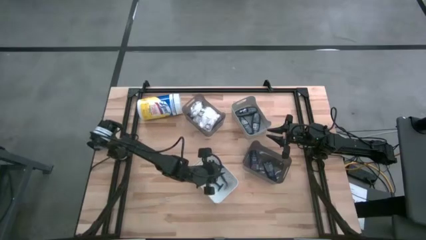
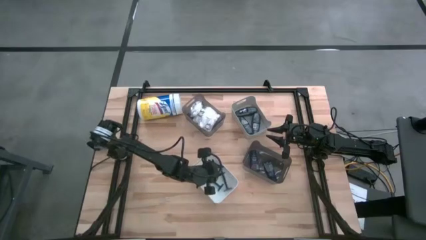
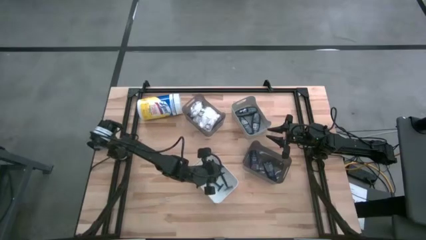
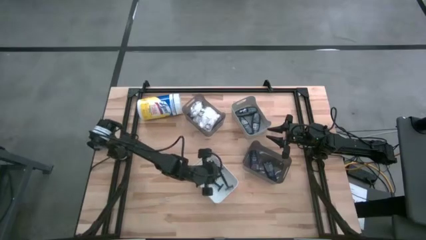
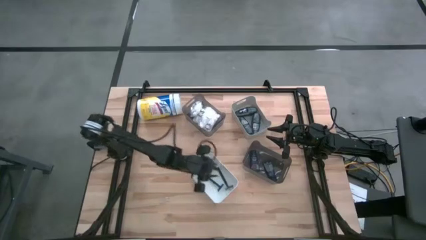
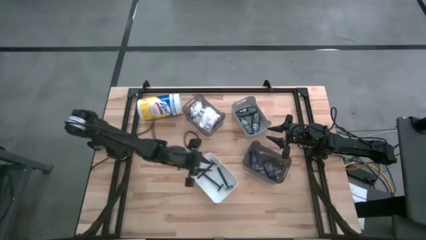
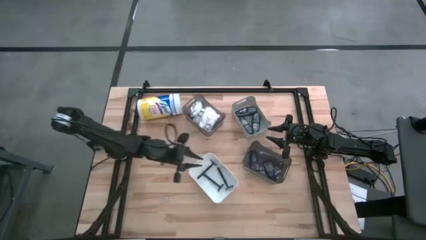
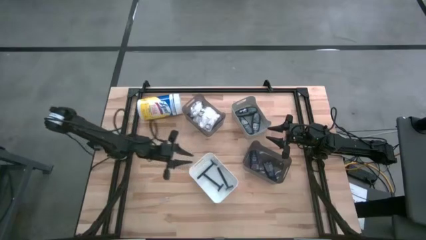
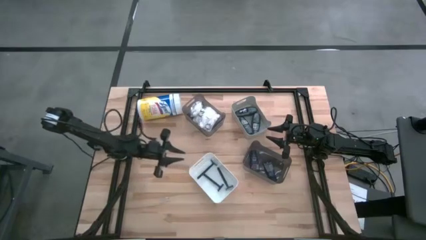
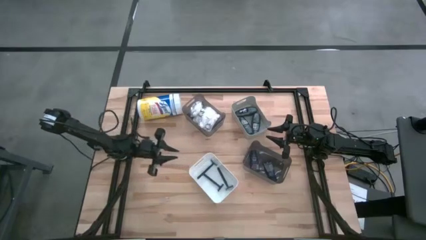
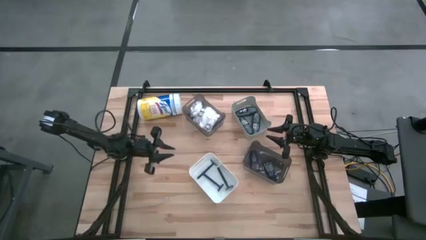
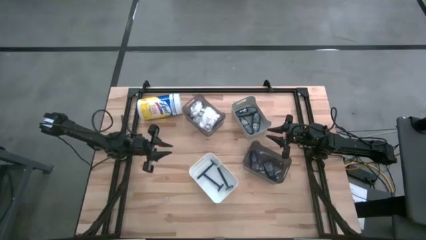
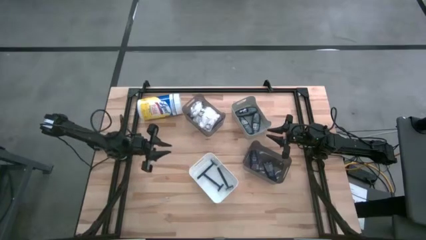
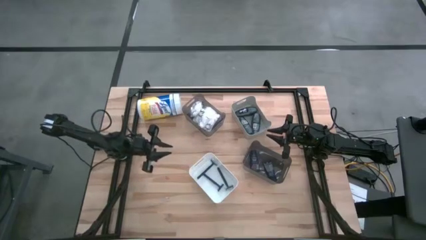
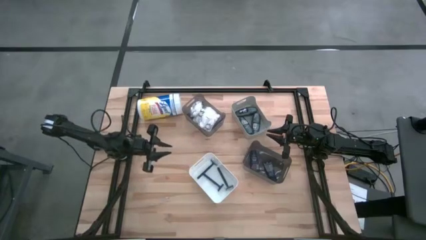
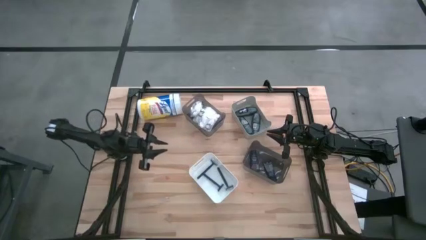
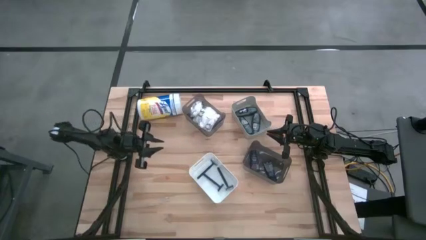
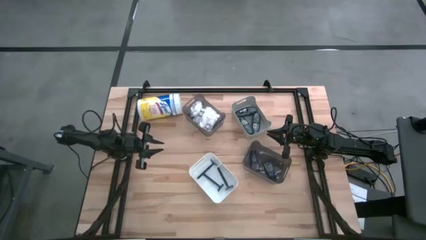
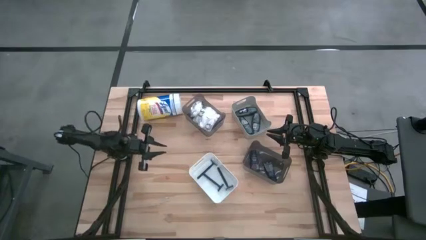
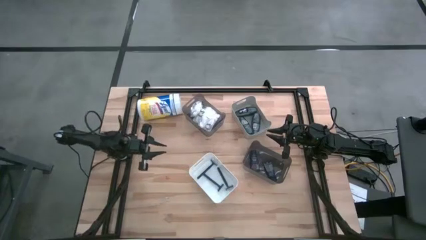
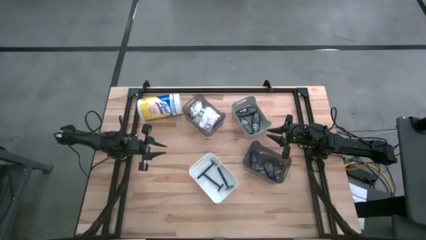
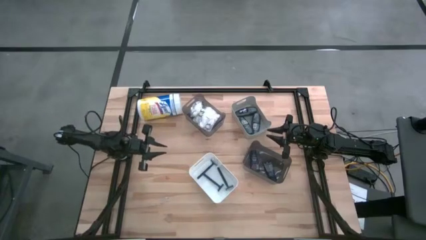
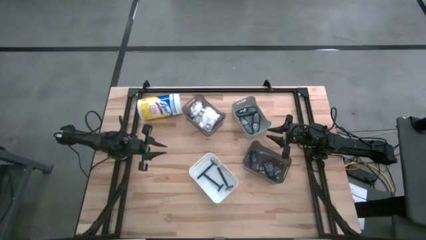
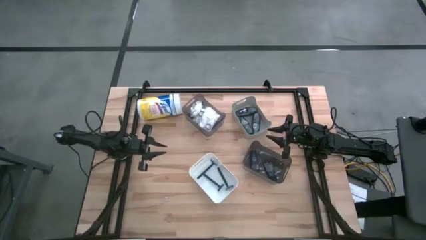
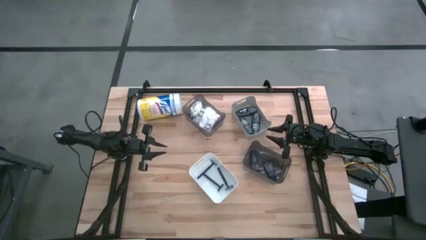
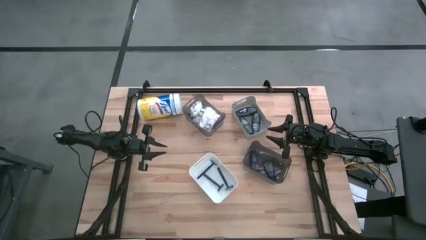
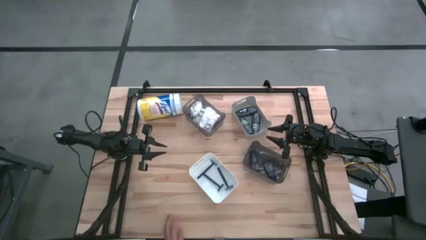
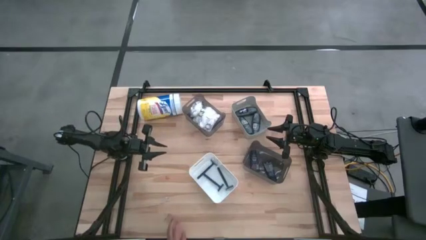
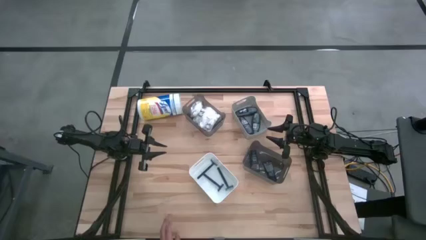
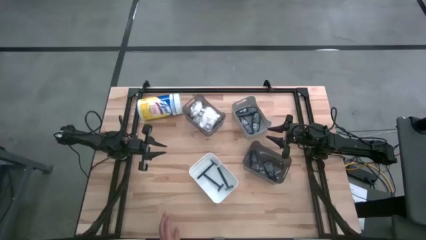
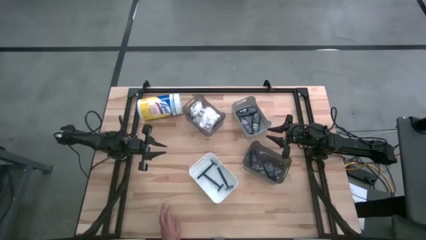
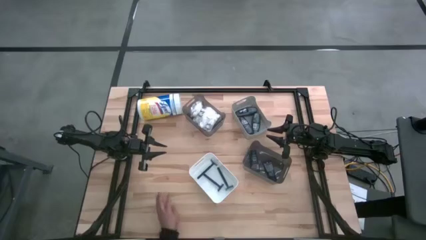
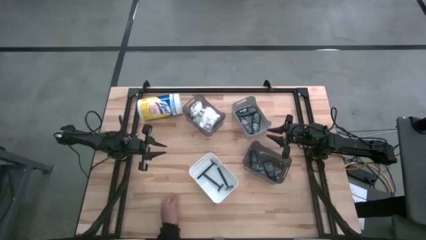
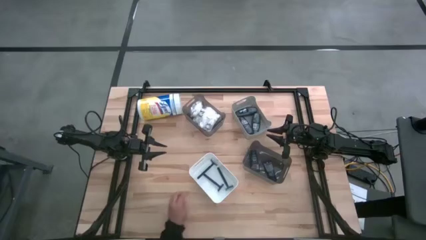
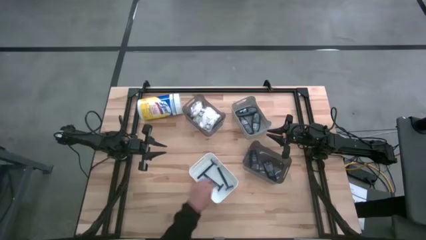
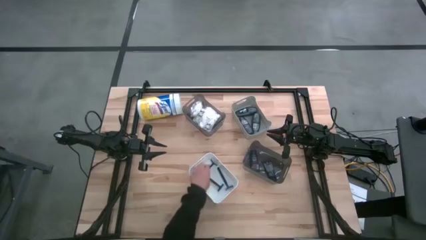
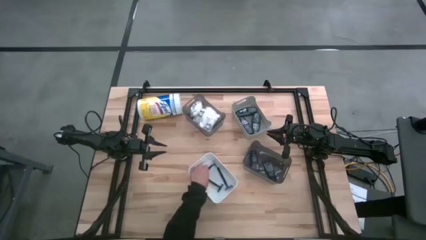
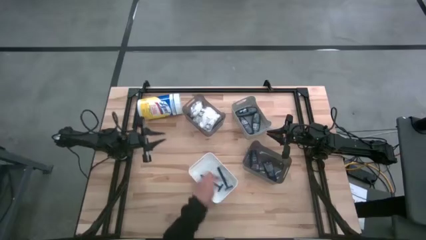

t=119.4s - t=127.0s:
Task: Pick & Place Travel size toiletries
Return to home position

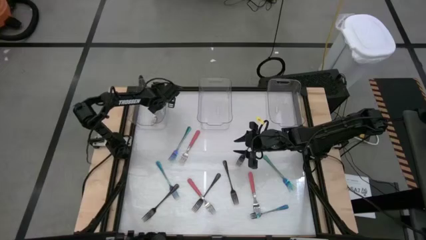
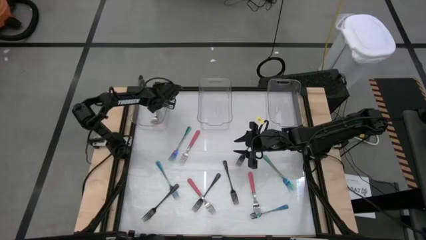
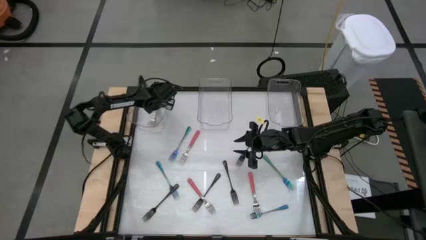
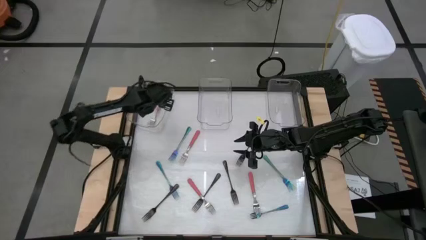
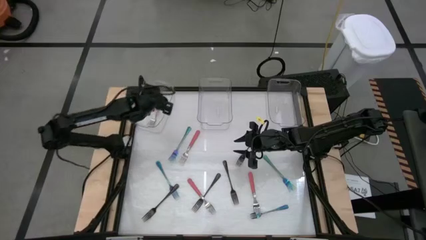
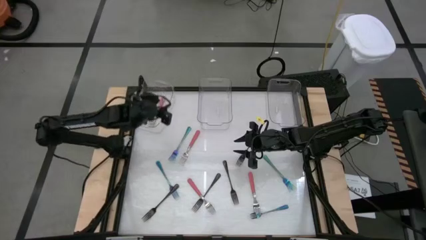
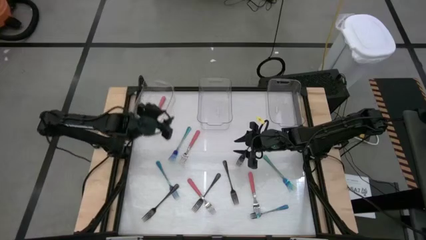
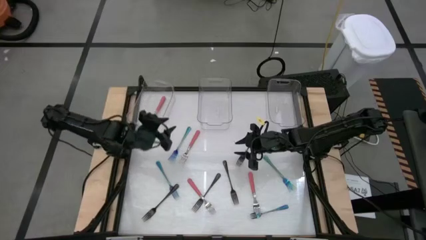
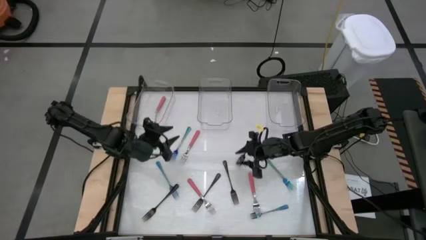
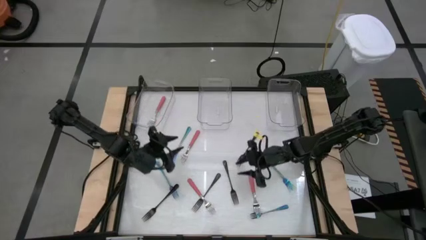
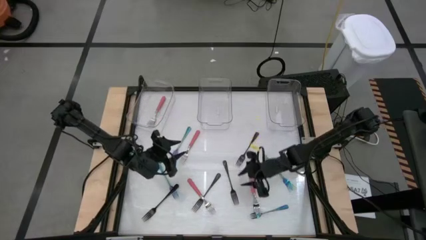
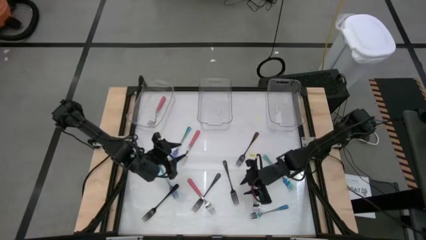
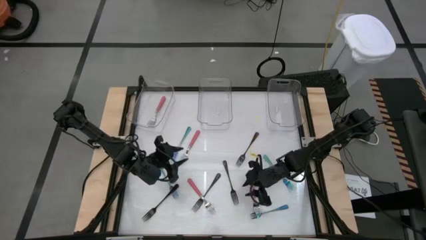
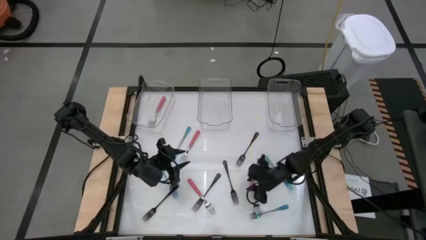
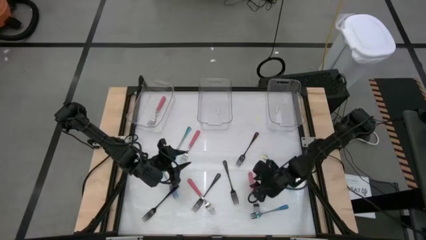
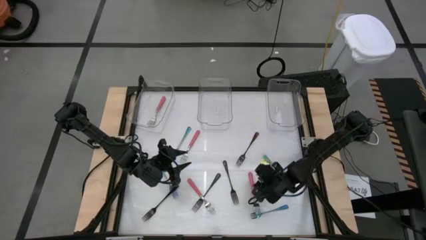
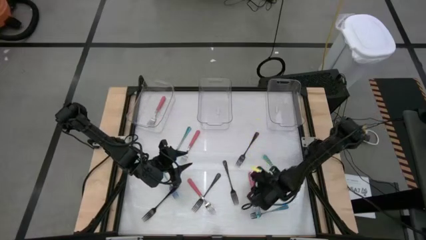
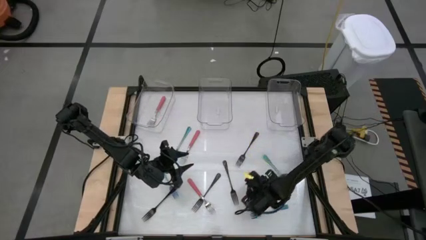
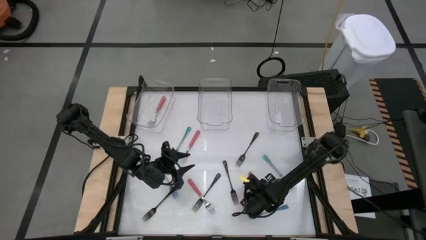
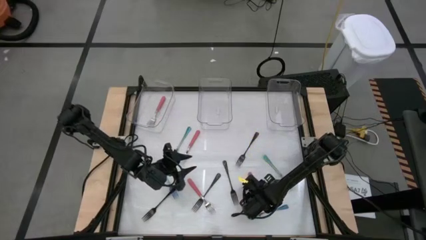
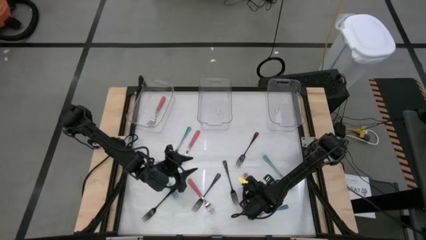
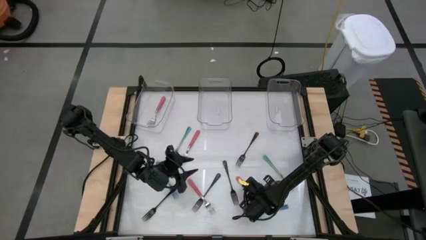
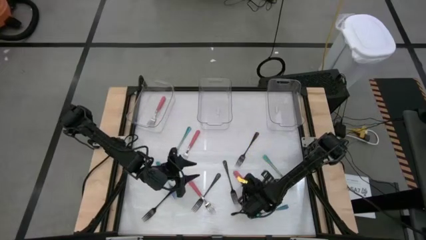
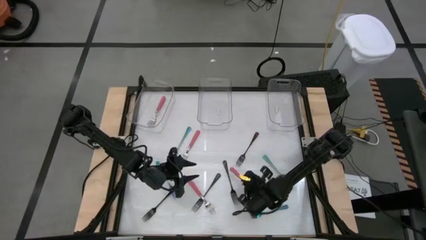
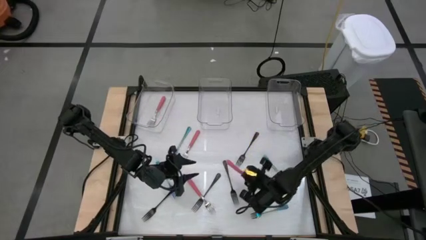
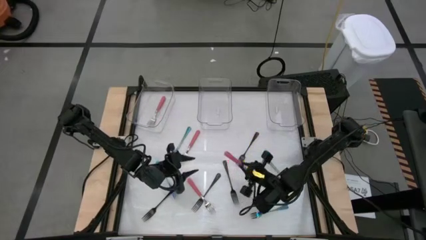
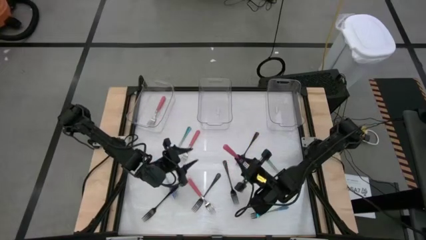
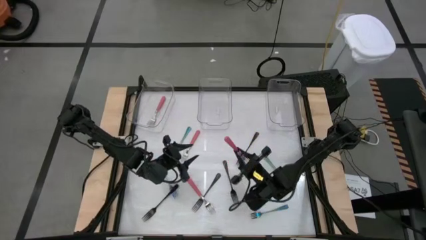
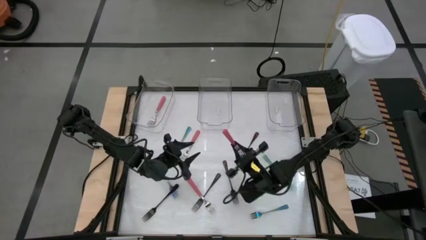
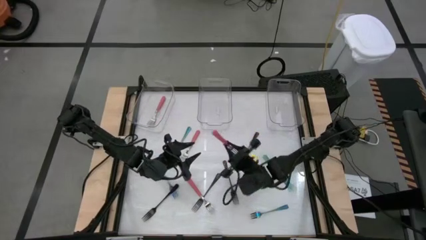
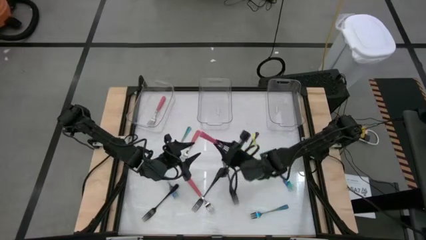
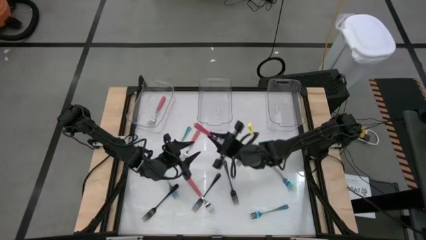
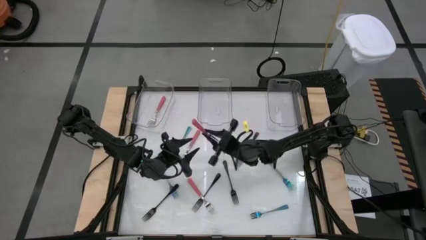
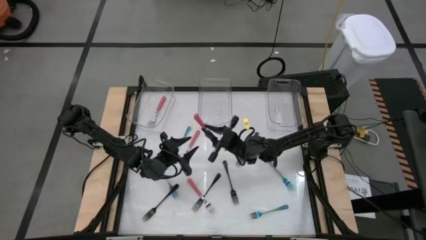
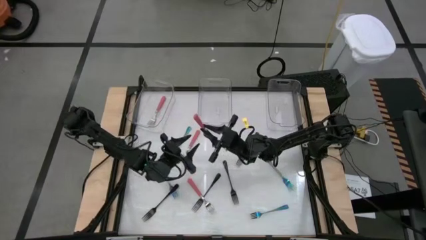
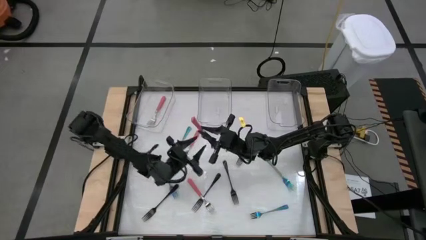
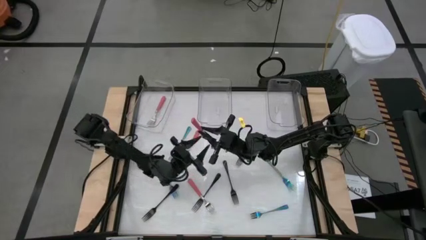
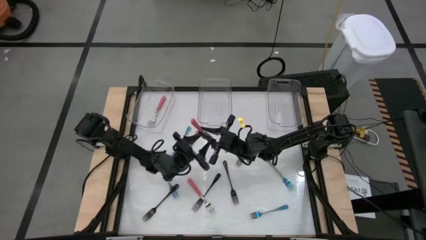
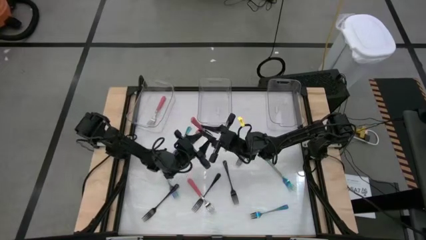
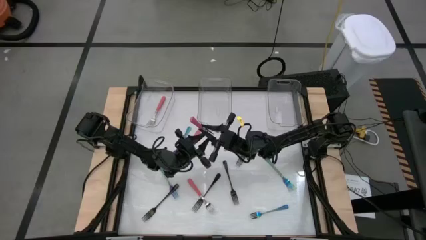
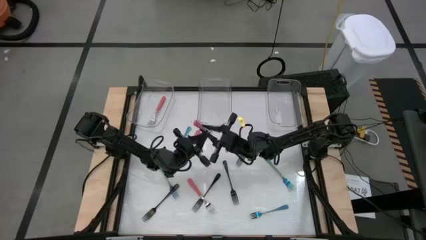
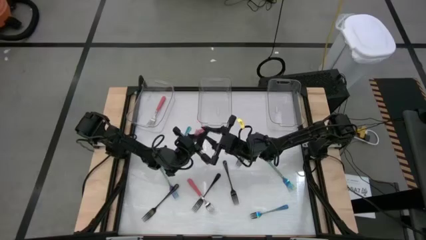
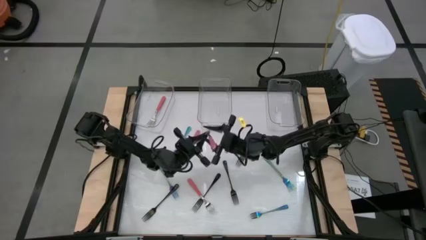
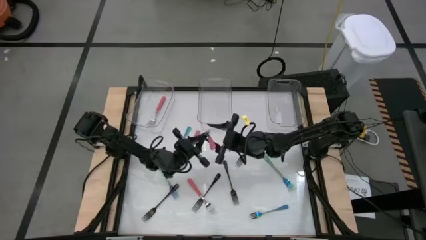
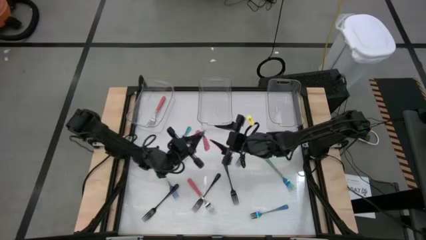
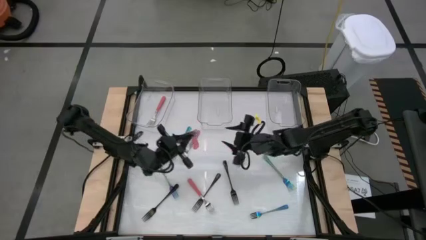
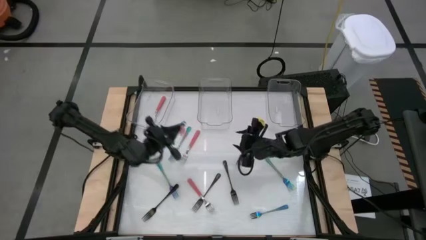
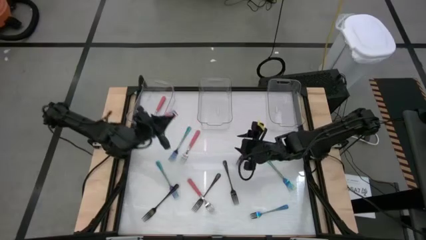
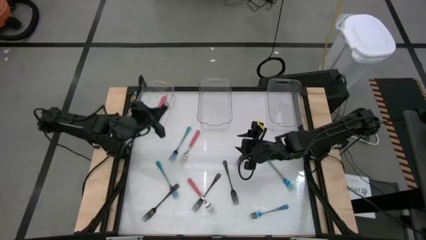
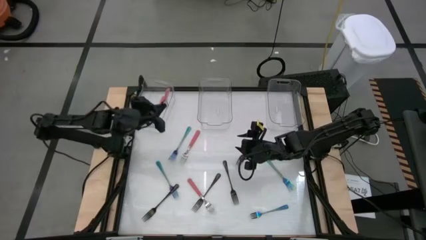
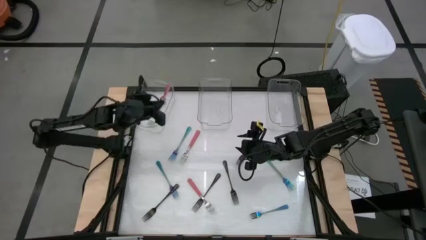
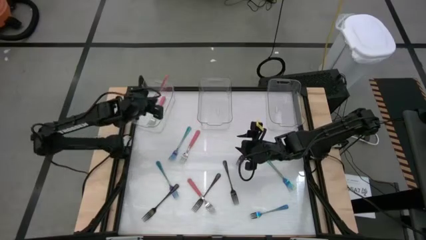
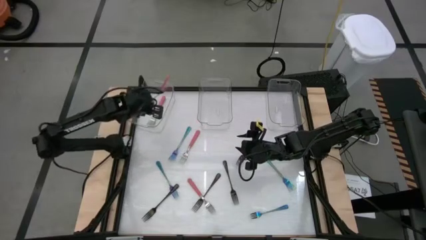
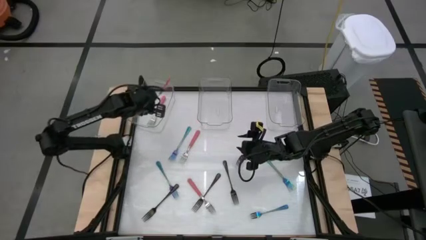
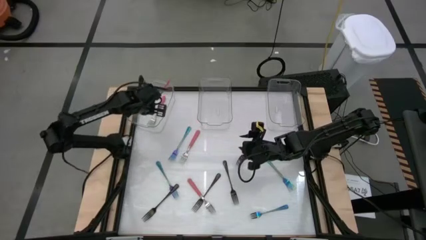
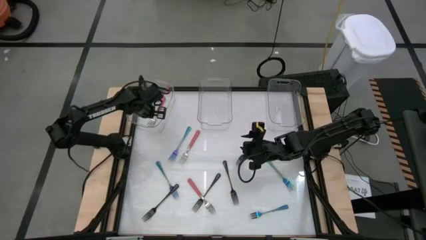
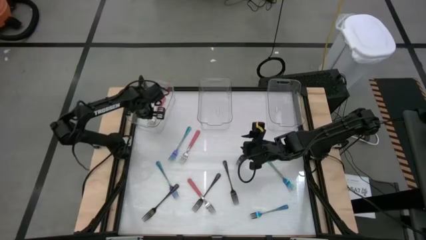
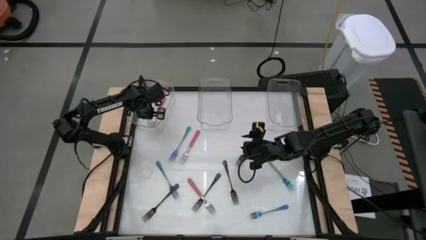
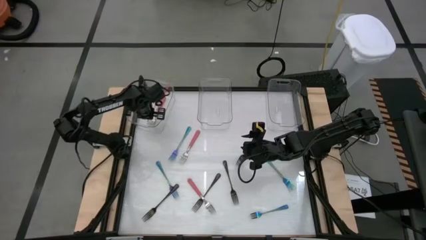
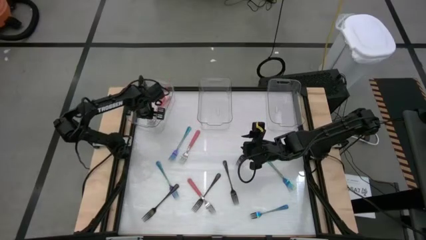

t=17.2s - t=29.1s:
Task: Sort silverware by color (type)
Put the pink fork into the left transparent bin
